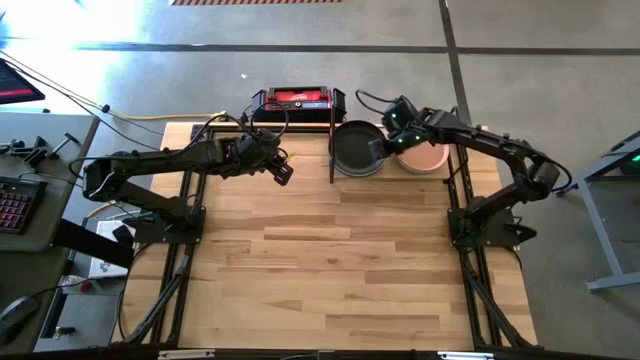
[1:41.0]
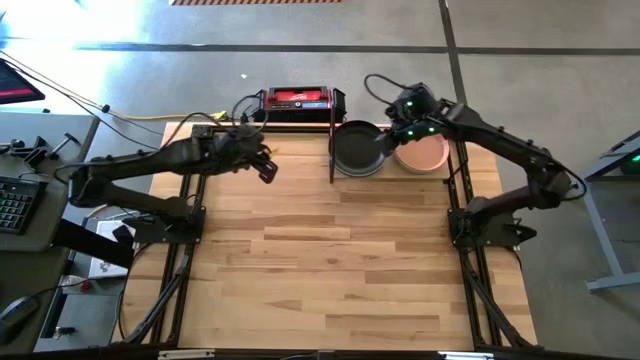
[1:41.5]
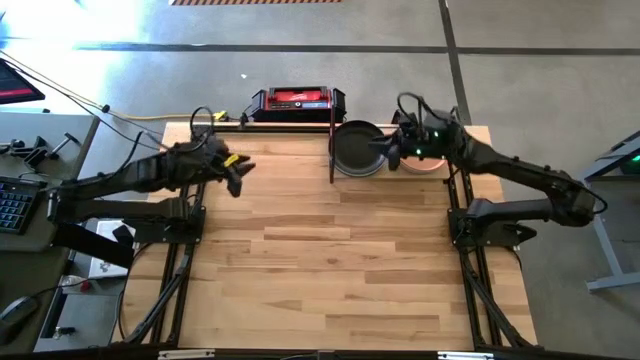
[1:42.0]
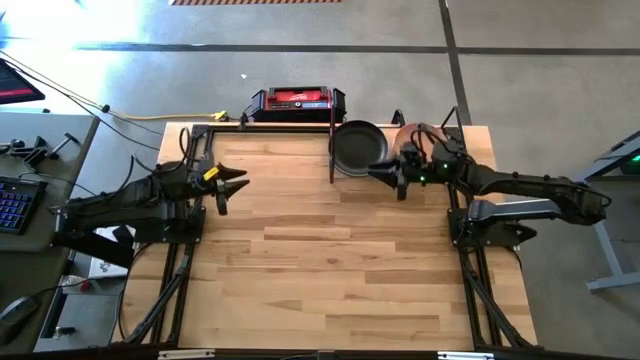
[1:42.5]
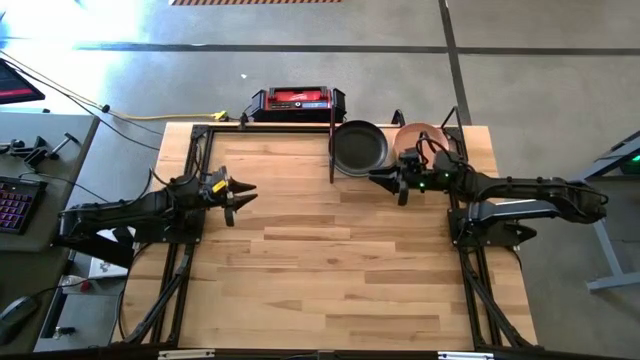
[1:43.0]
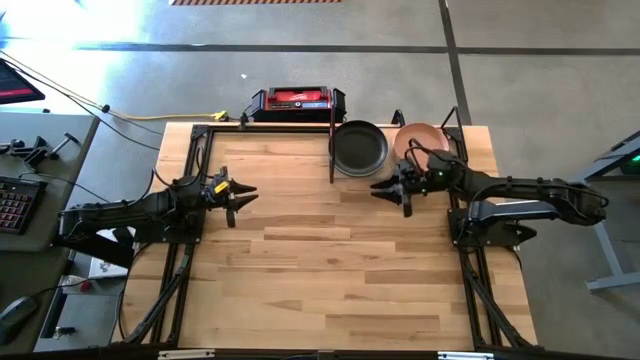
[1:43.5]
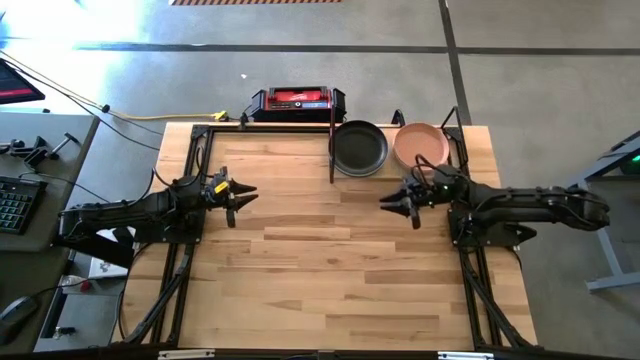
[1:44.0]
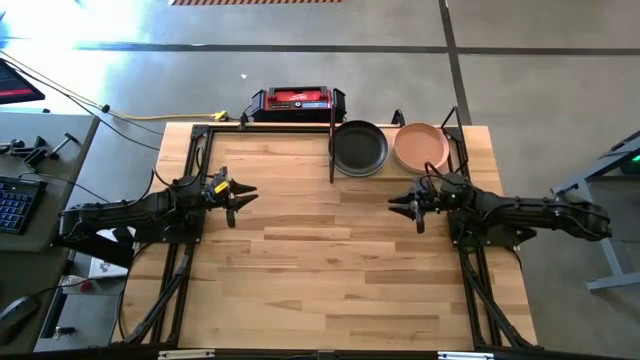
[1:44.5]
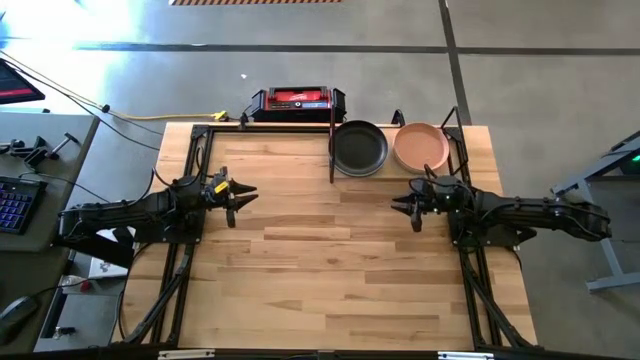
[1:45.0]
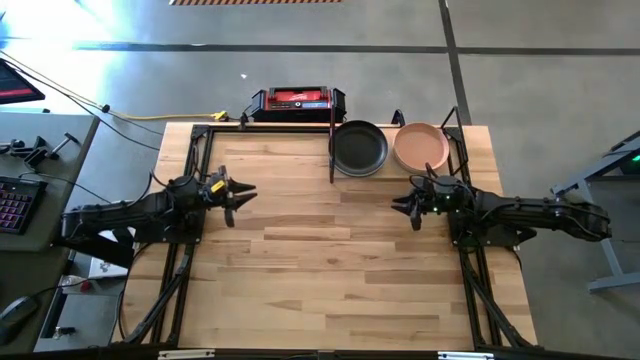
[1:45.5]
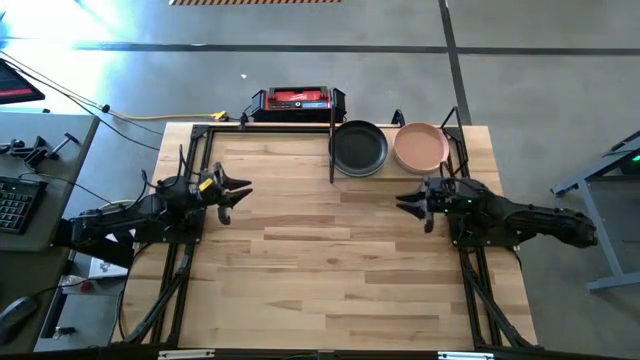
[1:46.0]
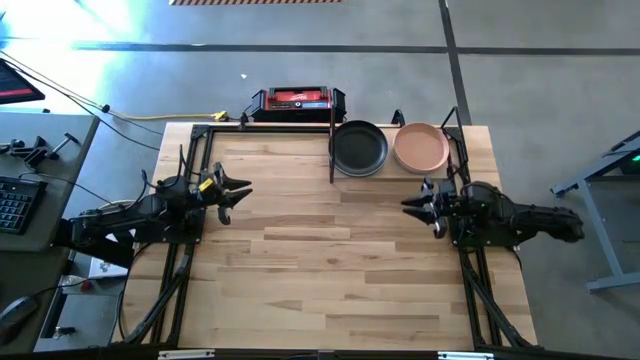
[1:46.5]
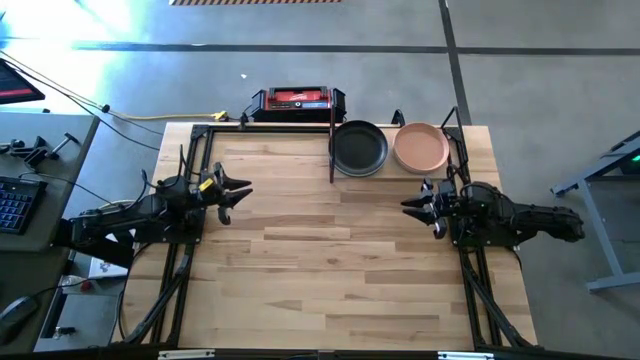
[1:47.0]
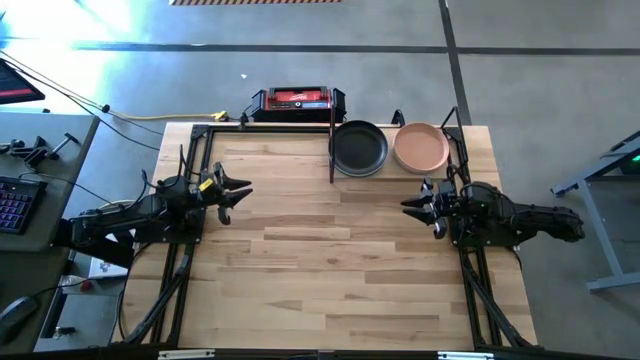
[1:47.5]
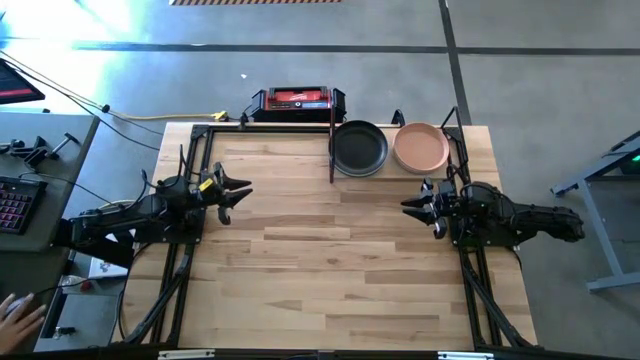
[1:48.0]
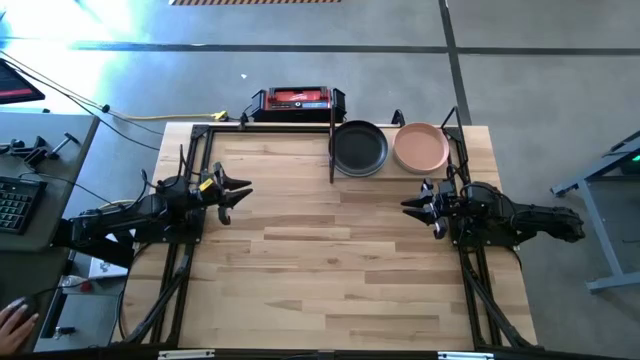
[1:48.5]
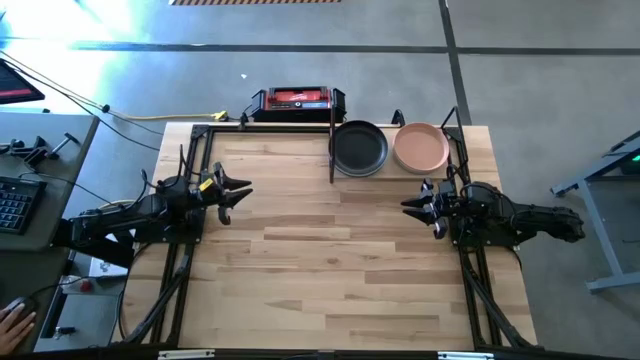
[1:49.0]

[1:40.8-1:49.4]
Task: Place and stack plates onto a shelf
Return to Home Position

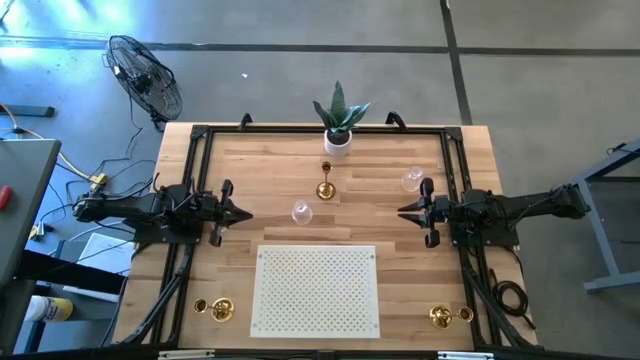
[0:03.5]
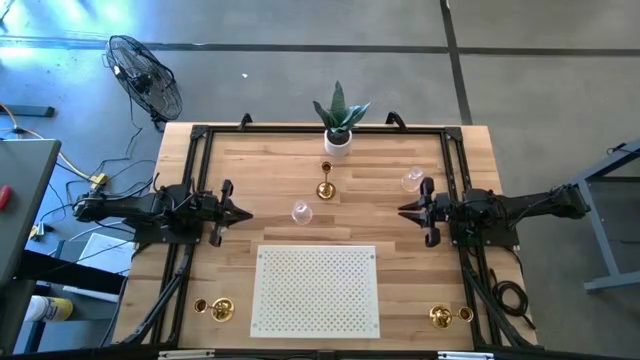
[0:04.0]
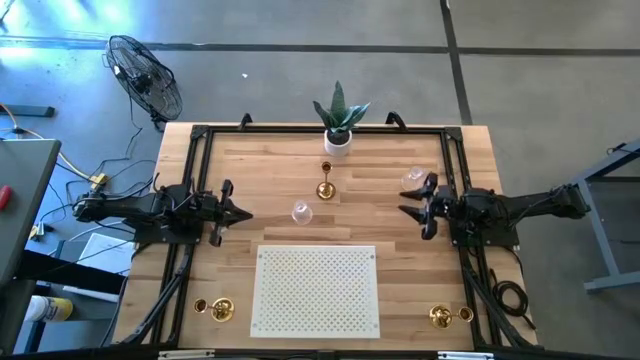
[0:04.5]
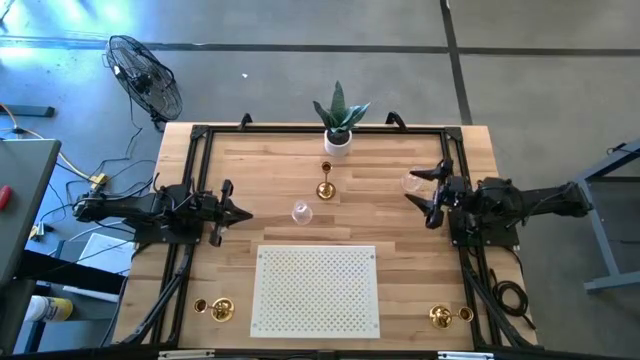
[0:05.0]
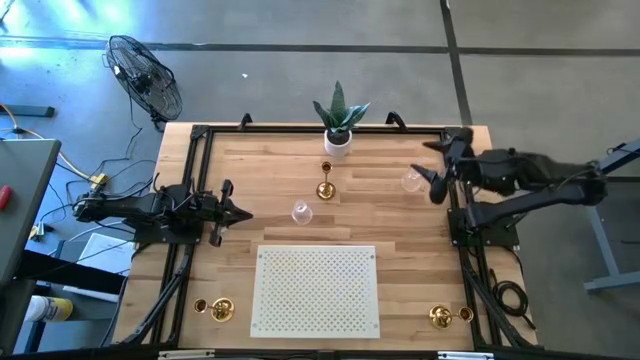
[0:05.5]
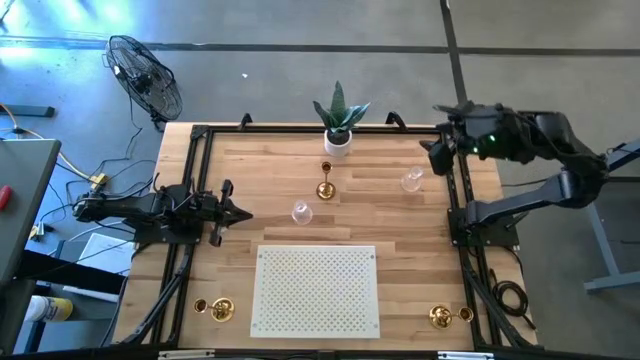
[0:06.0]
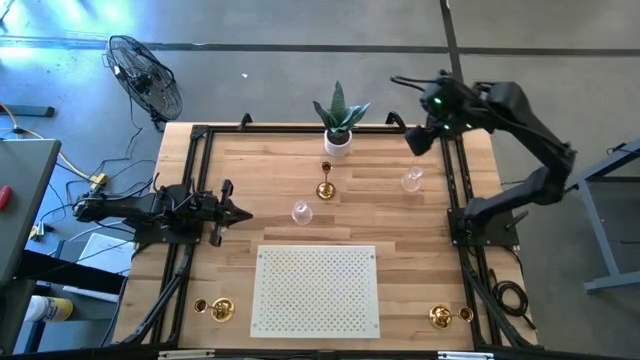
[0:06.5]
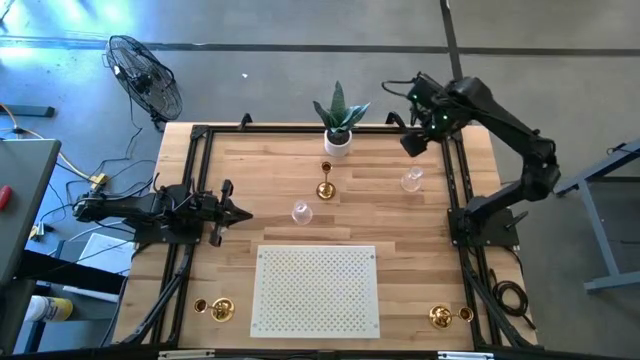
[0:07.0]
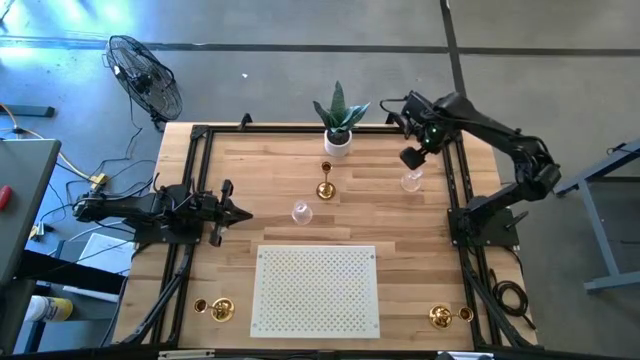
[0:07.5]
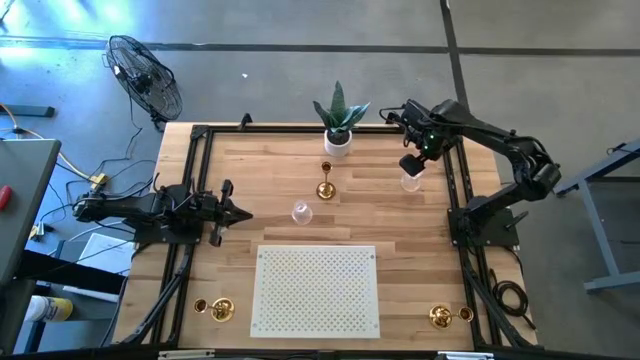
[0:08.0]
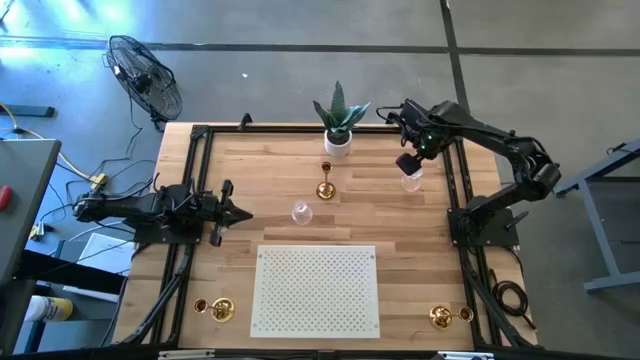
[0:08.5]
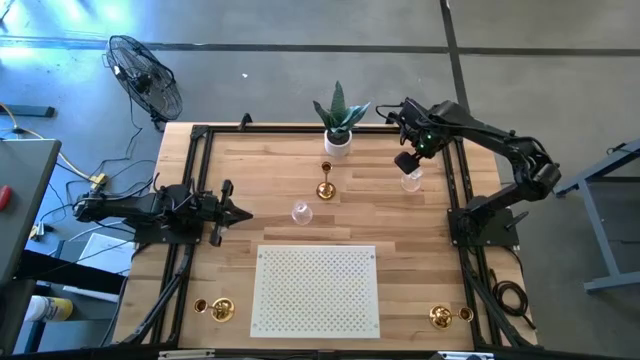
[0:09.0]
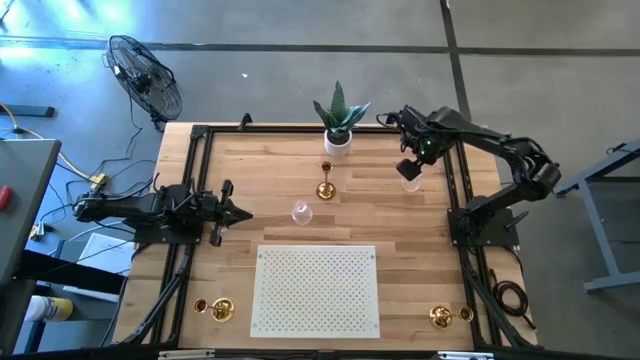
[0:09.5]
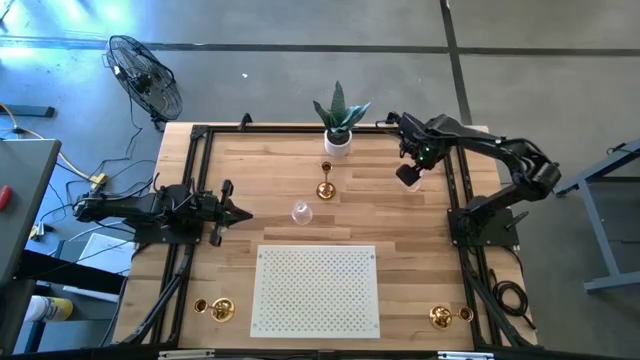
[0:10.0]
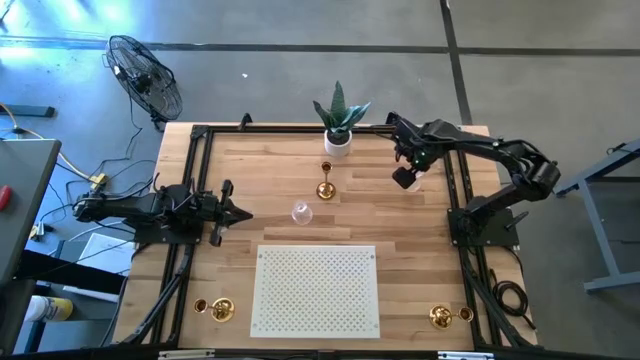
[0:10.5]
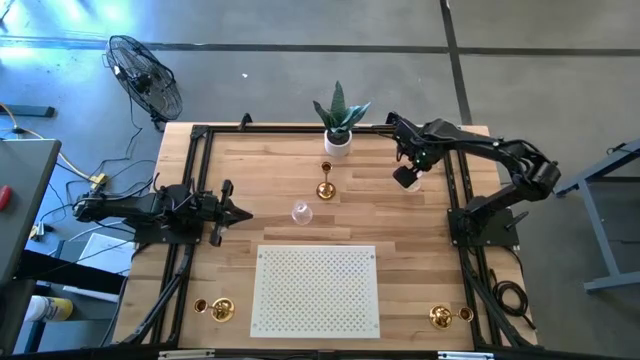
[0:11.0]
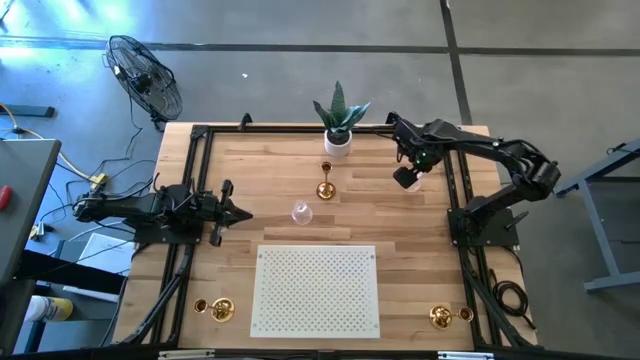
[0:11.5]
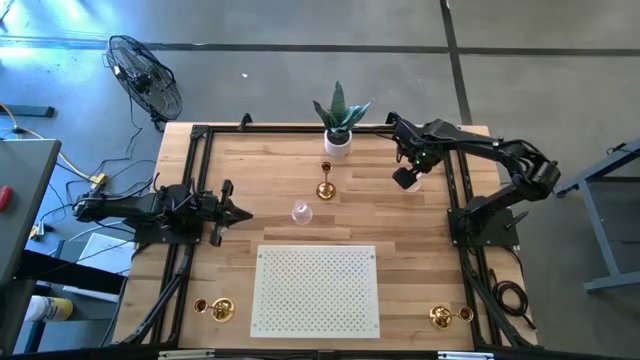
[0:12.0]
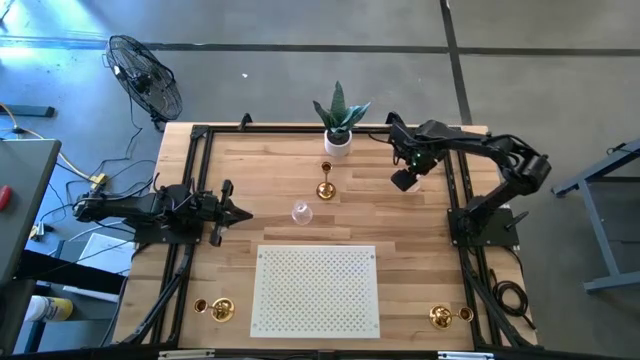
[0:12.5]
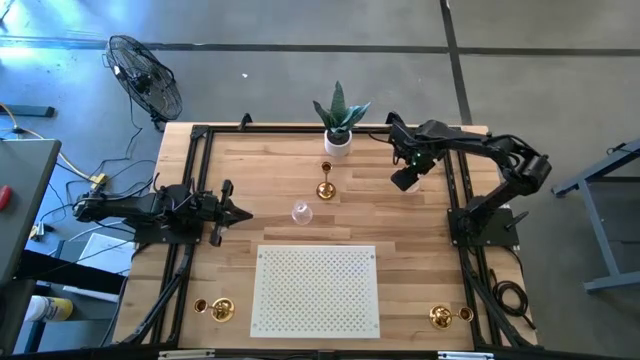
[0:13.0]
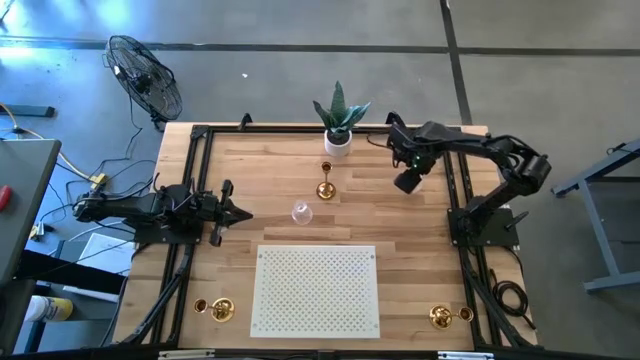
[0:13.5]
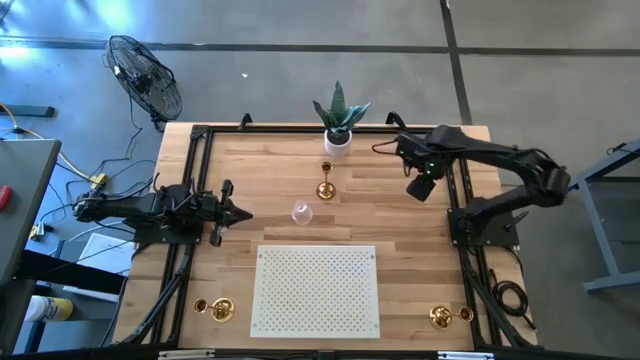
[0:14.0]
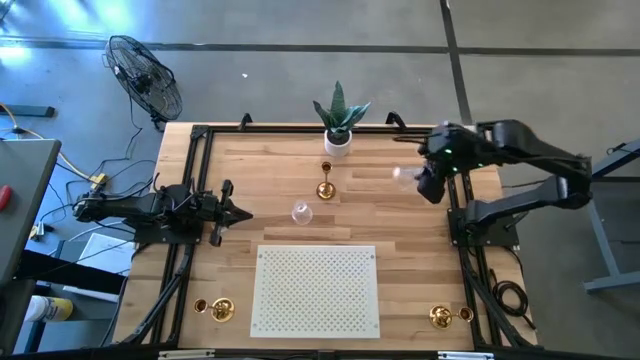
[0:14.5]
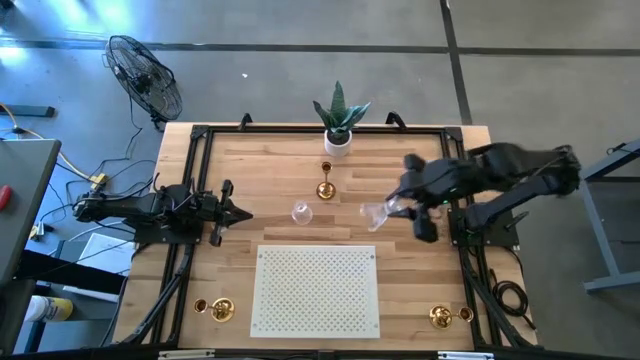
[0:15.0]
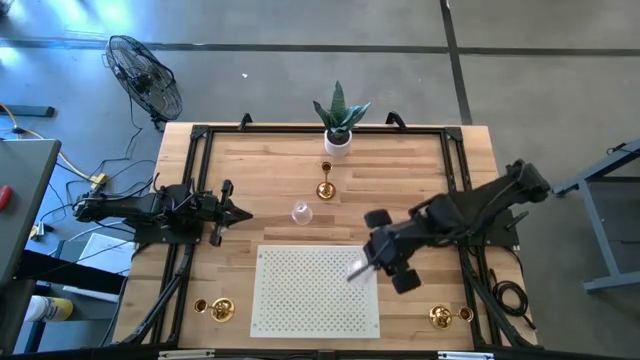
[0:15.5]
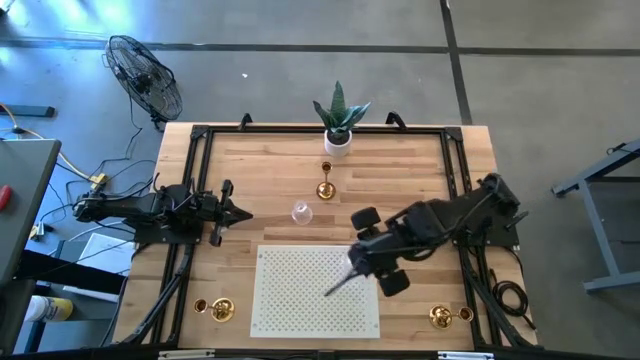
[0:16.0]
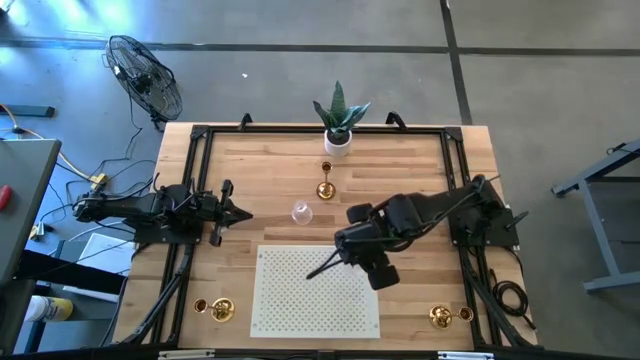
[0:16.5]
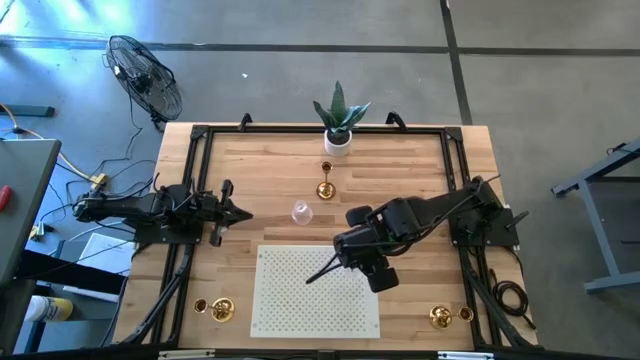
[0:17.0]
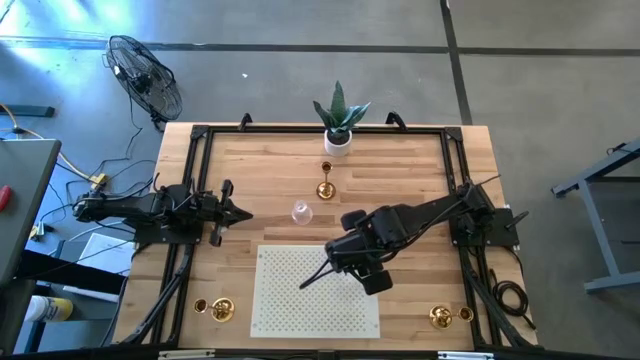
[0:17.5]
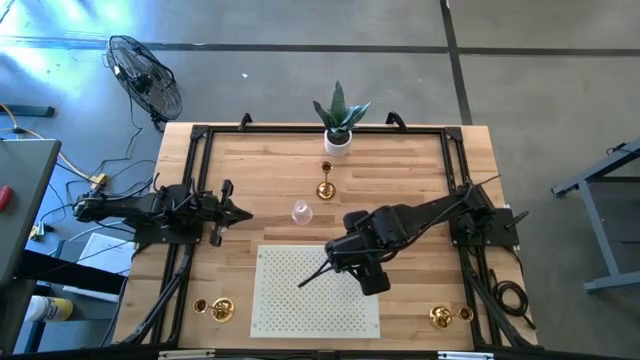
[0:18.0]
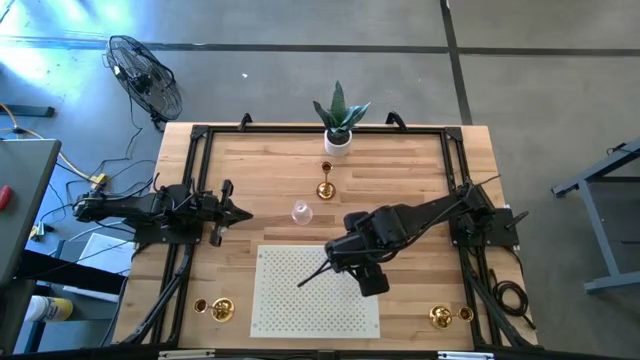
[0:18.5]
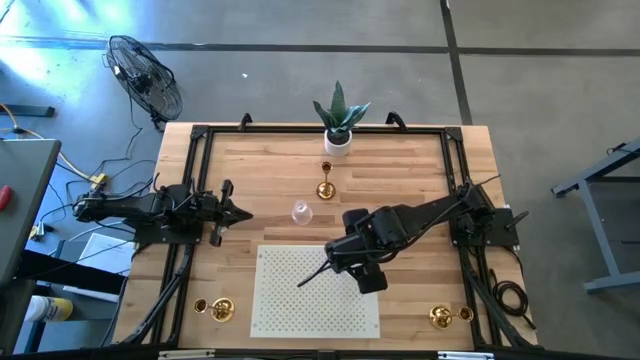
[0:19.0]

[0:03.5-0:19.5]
Task: Pick & Place candle stick holders
Put the right transparent candle holder on the shelf
